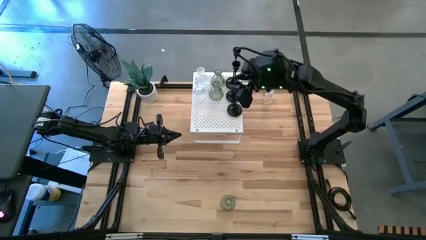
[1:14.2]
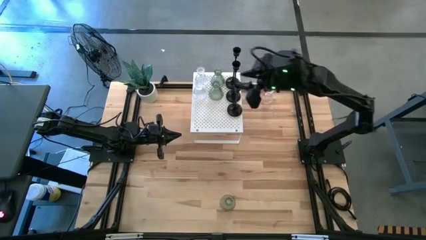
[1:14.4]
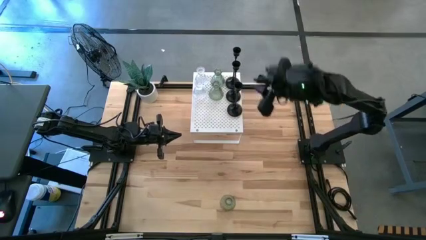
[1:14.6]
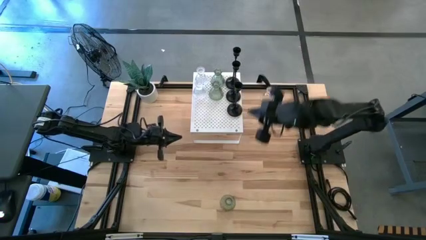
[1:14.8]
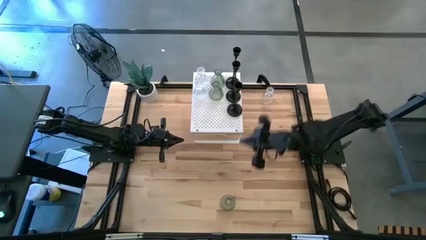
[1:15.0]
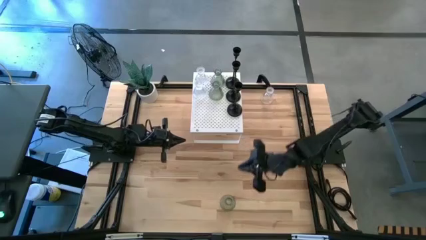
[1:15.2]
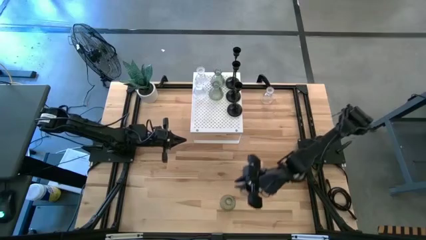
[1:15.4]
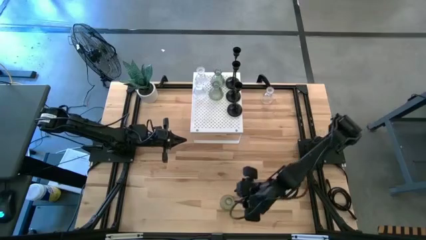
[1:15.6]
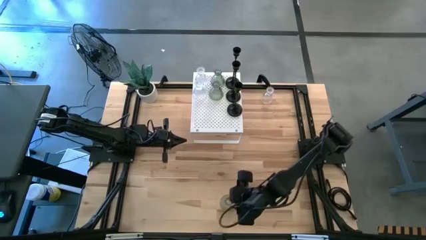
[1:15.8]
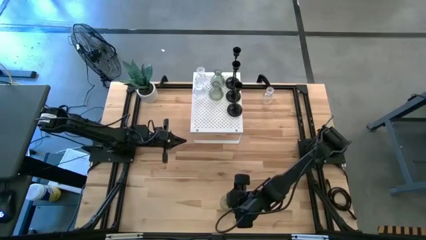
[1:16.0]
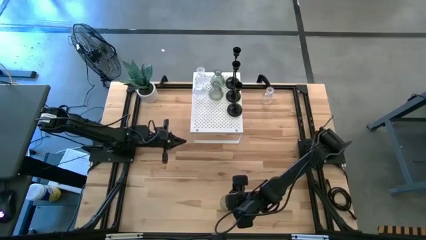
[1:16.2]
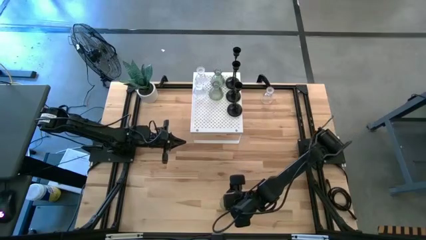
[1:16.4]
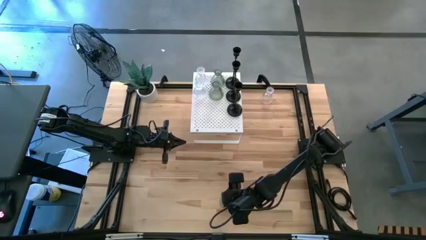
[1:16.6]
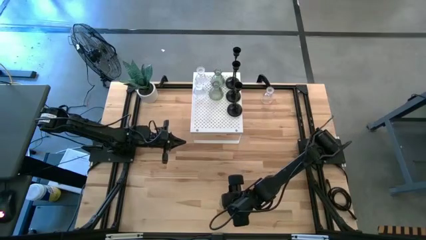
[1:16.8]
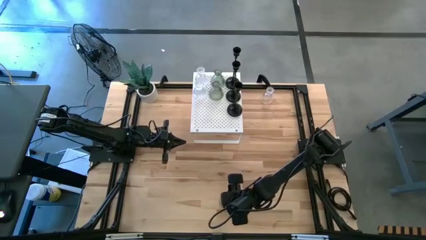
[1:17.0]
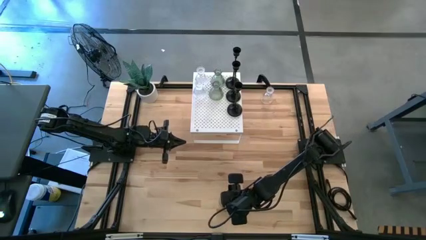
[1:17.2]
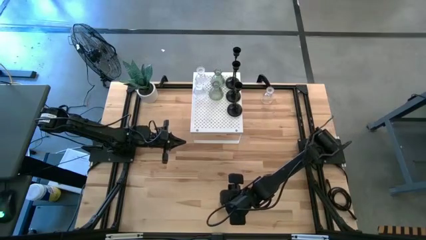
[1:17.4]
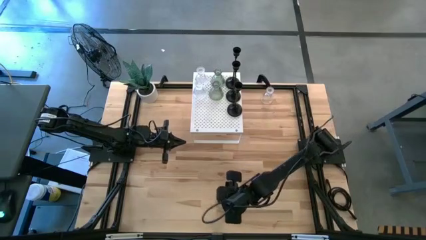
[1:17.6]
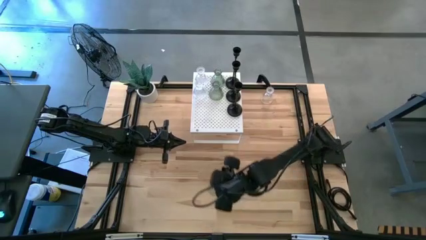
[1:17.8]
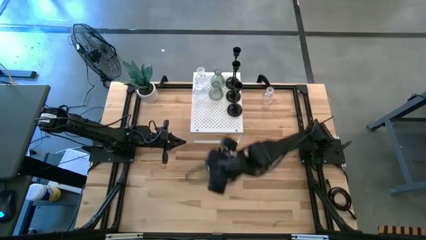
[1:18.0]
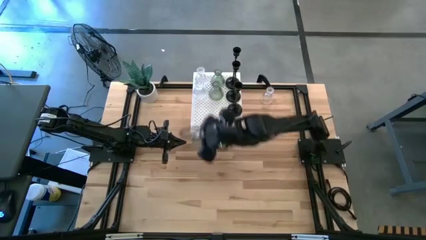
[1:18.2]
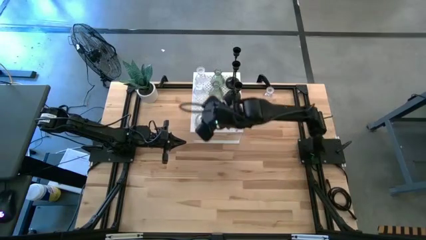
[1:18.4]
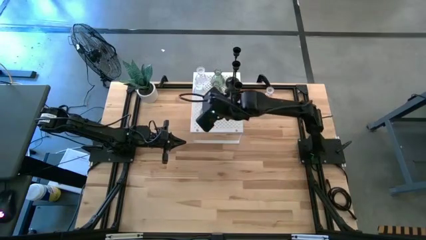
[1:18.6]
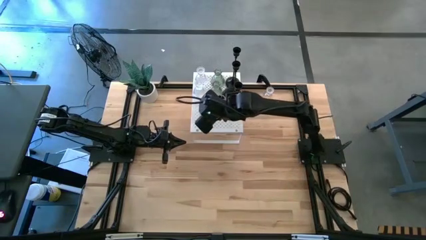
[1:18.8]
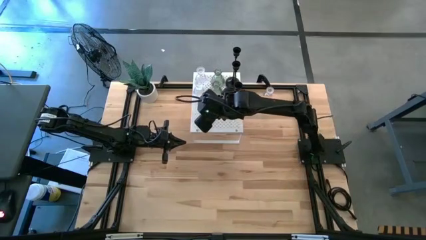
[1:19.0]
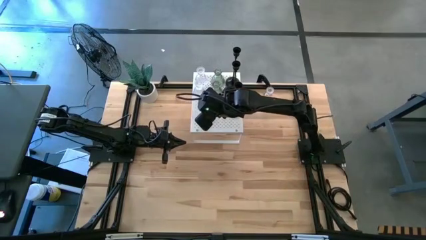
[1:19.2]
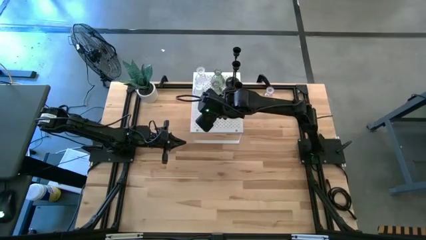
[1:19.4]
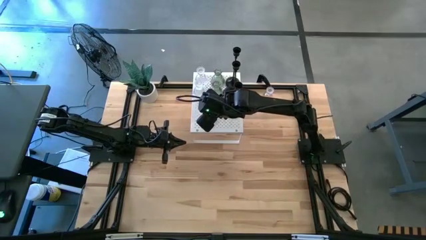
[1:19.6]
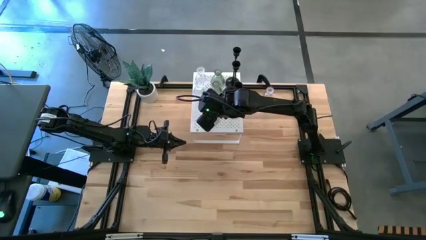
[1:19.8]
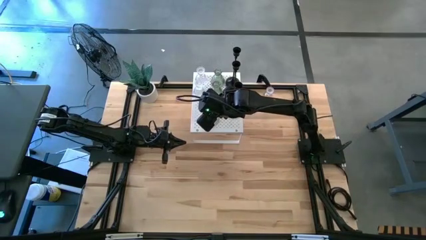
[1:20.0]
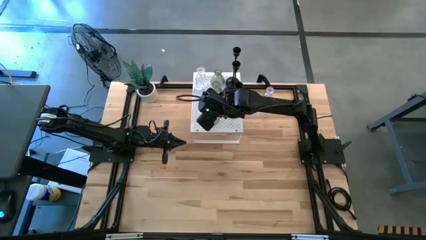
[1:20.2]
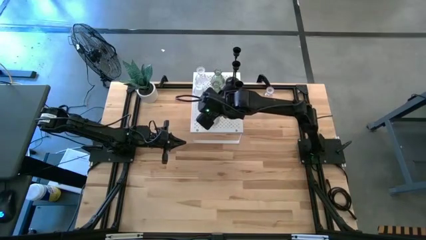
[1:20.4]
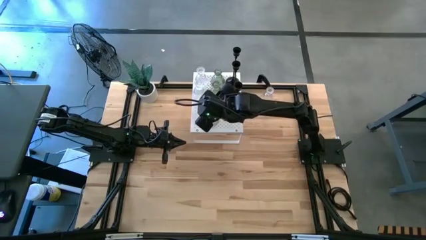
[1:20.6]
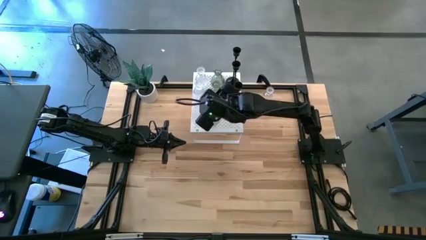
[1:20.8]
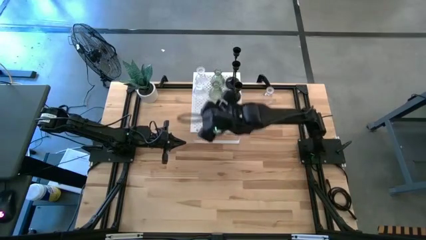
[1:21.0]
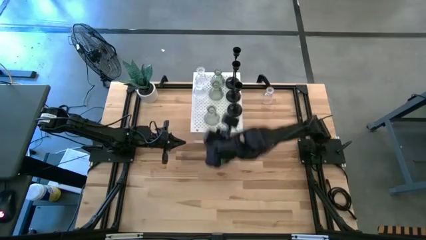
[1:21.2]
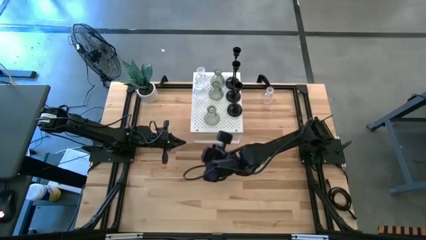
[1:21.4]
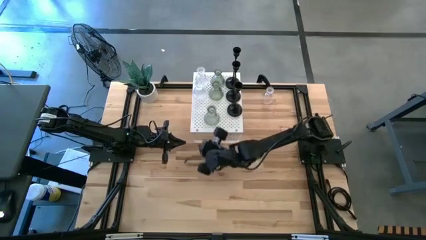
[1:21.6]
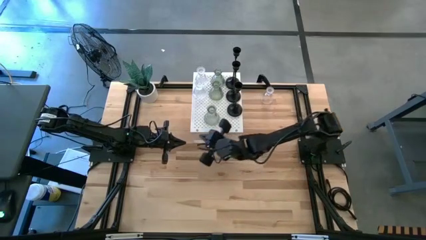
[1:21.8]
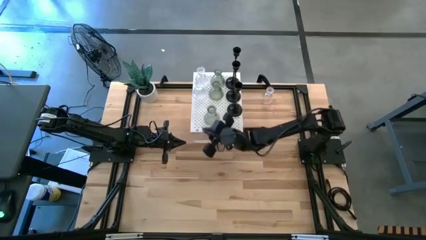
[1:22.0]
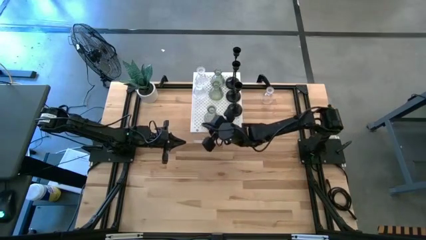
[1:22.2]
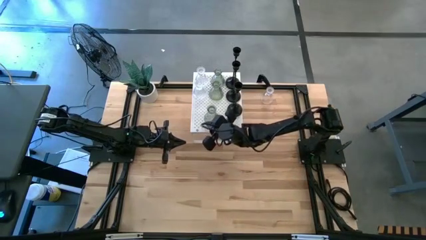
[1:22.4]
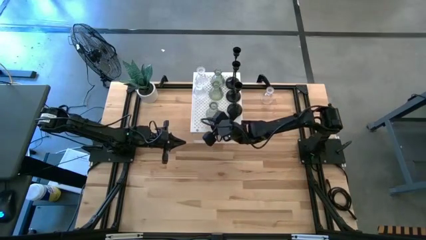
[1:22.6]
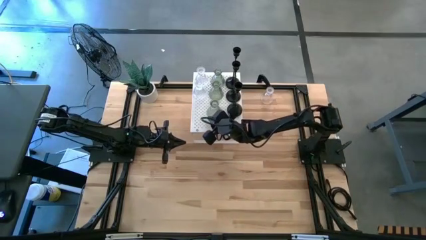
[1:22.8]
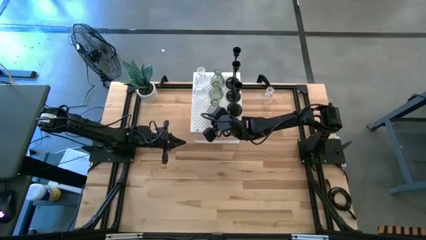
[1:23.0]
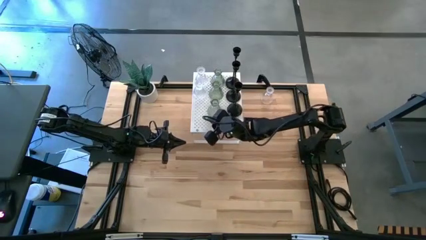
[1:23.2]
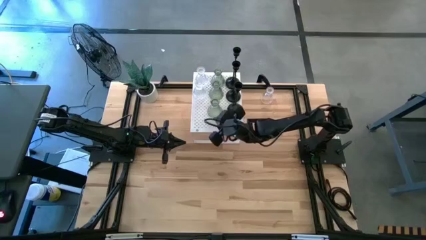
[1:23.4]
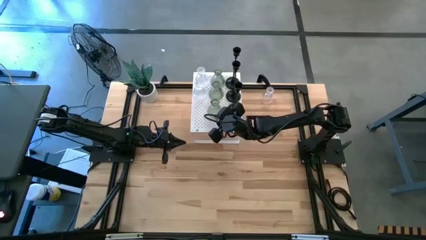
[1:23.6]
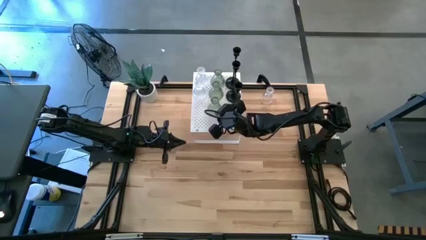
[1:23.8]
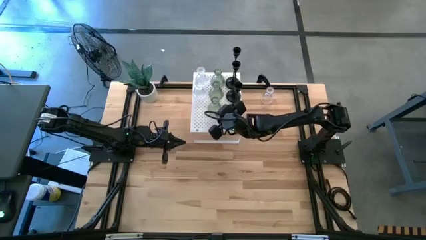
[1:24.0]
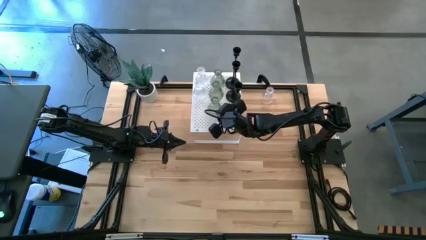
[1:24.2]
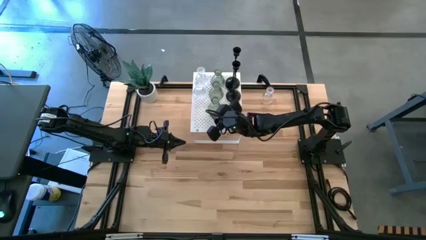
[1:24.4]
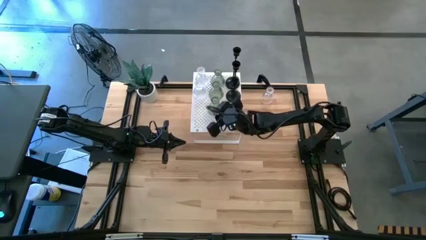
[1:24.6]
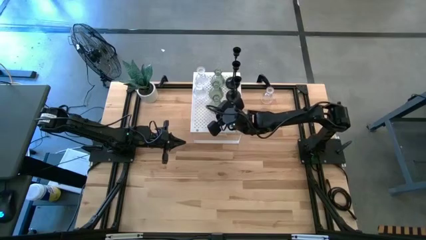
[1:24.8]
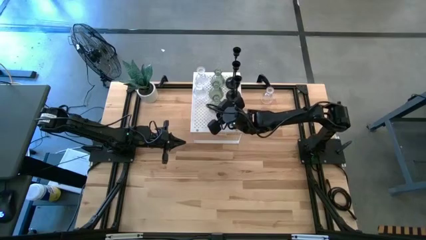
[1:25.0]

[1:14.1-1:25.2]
Task: Pick & Place candle stick holders
Put the green candle holder on the shelf aligned with the green candle holders

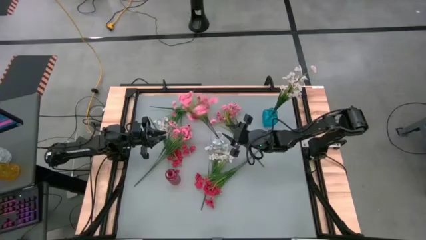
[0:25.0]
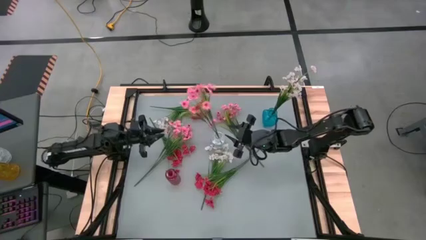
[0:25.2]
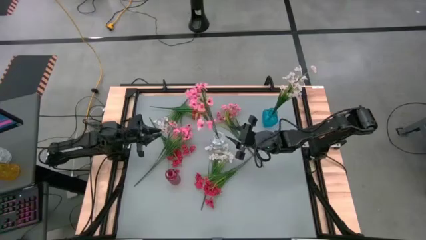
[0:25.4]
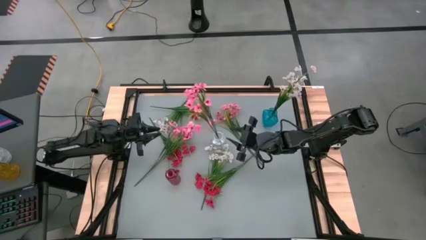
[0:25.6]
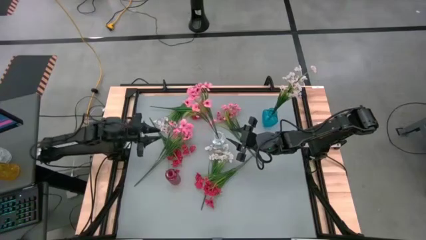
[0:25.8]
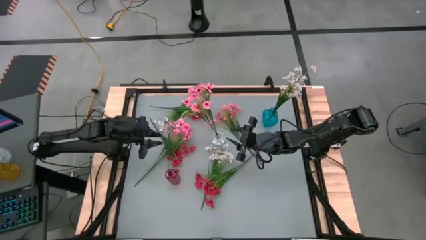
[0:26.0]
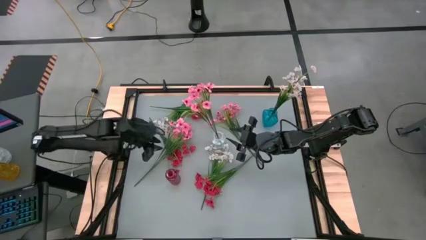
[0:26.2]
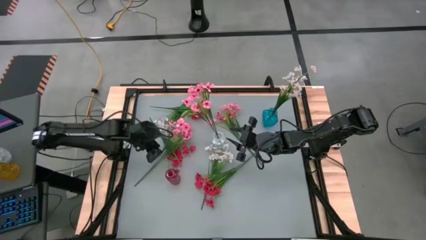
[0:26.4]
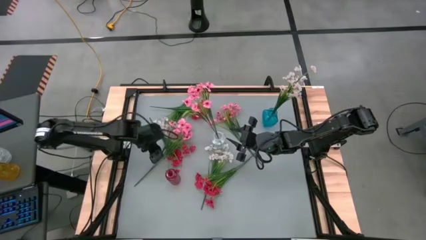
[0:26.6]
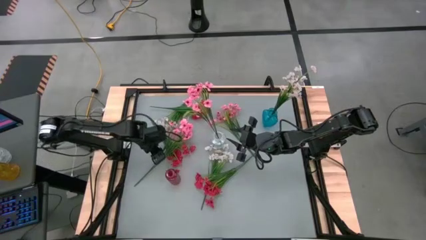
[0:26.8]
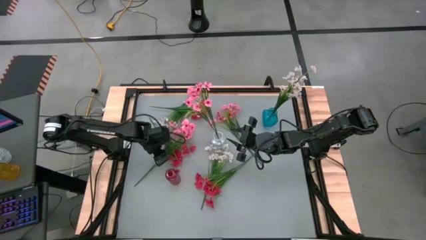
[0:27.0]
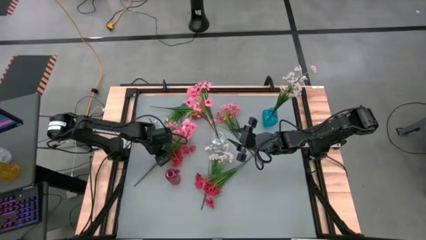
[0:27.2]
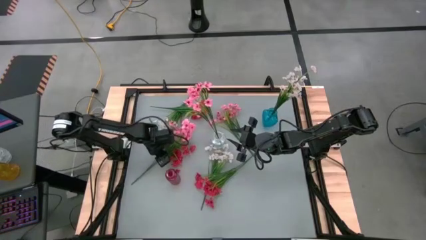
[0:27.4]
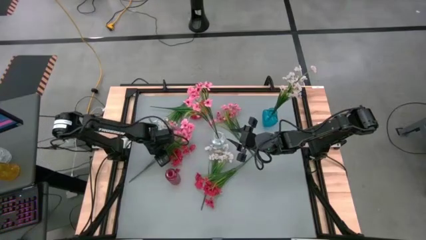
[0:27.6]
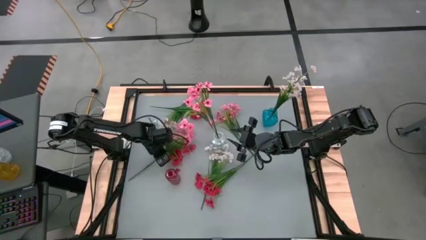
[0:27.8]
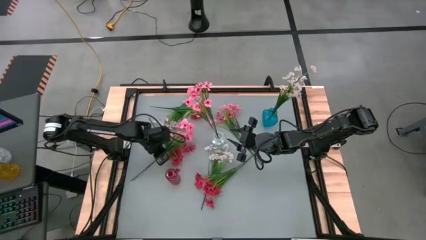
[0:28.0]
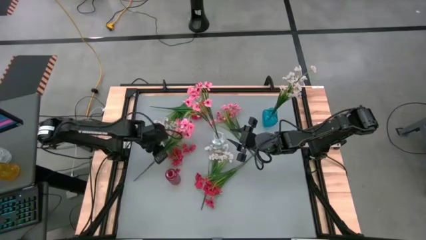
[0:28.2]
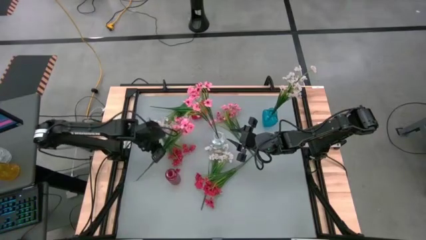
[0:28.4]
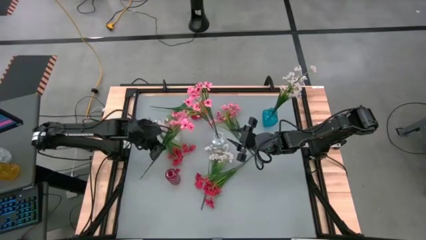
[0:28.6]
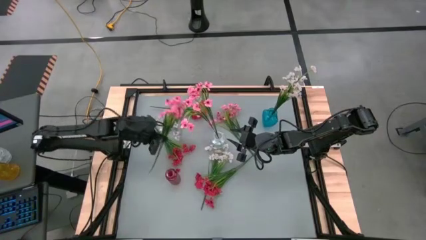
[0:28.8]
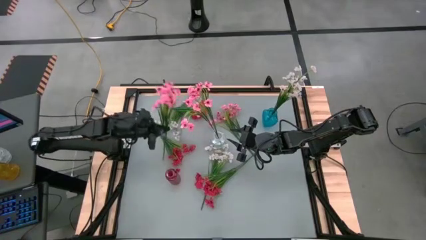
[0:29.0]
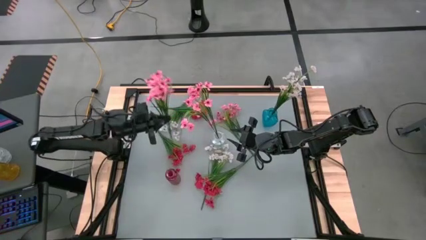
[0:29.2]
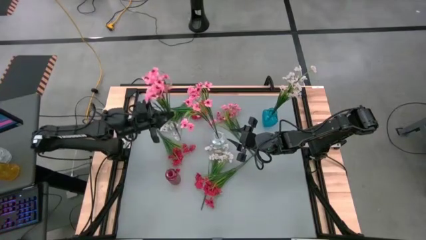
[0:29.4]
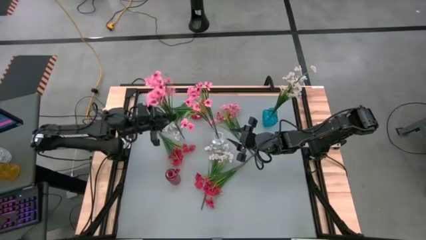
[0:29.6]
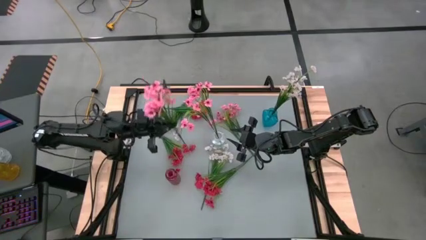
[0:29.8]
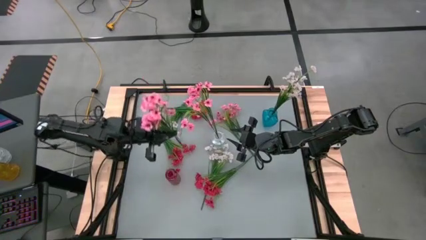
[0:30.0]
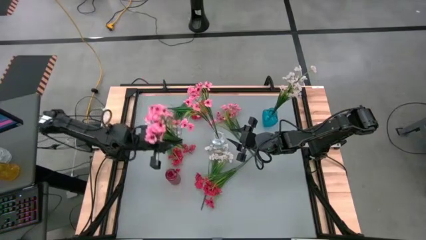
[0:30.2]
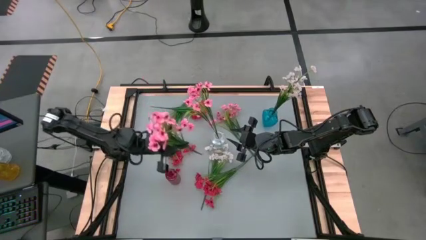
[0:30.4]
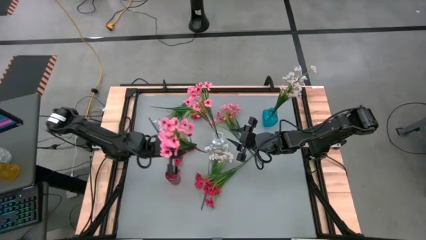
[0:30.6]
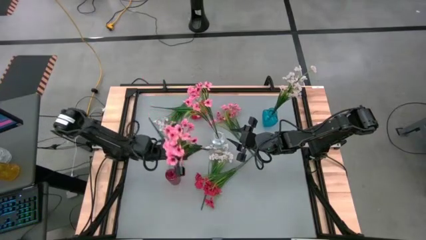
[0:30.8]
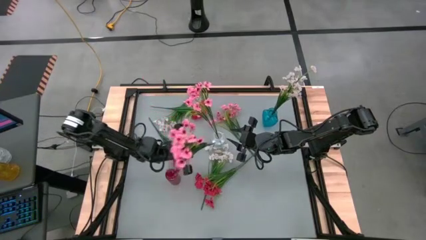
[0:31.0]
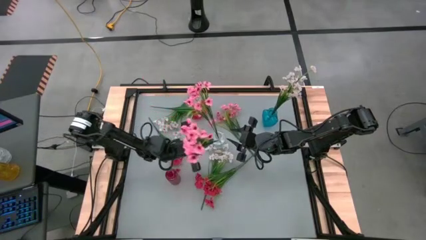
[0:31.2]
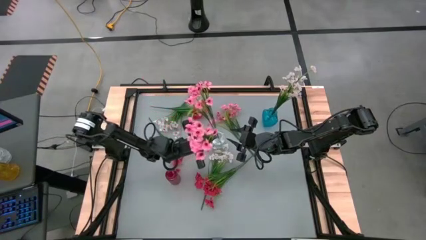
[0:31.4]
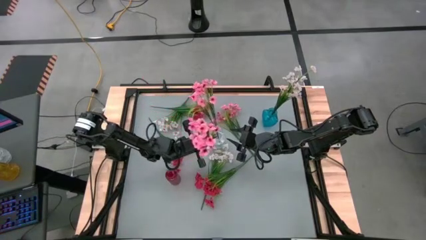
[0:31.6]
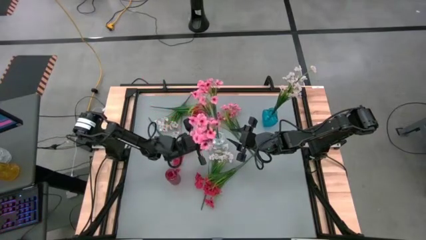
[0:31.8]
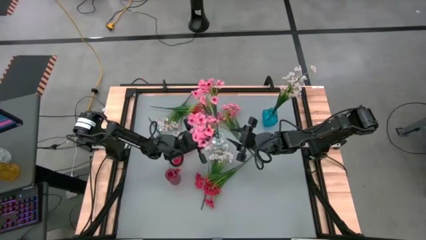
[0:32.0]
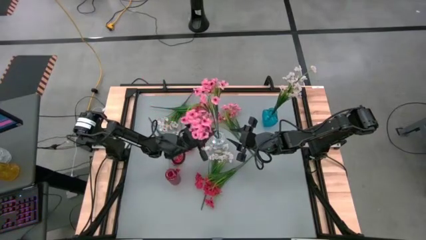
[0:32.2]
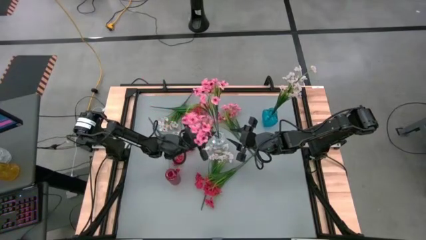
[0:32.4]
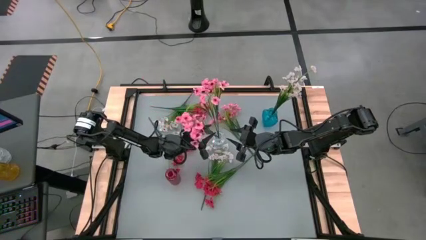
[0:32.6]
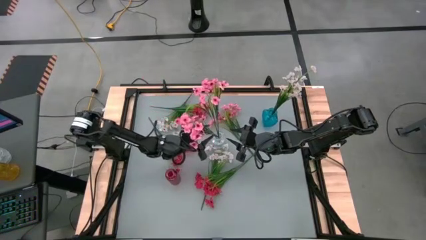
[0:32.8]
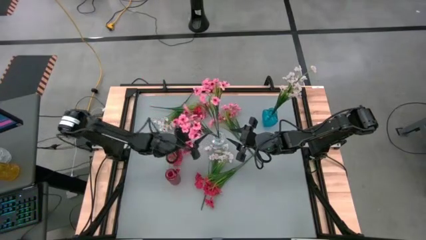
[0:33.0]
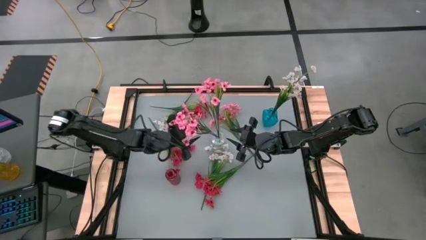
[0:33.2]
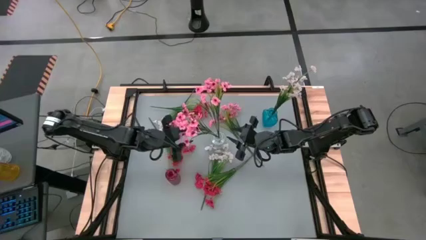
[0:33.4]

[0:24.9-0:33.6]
Task: Sort flowers into vase by color
Put the left pink flowers into the transparent vase
